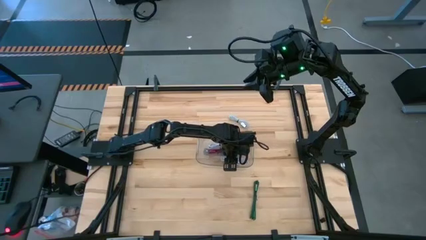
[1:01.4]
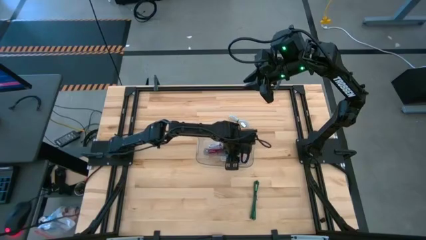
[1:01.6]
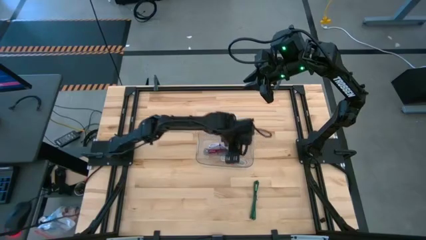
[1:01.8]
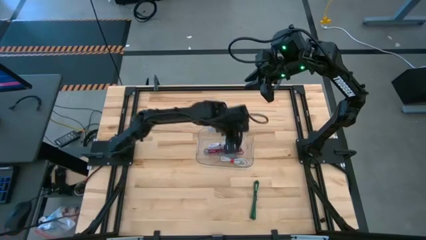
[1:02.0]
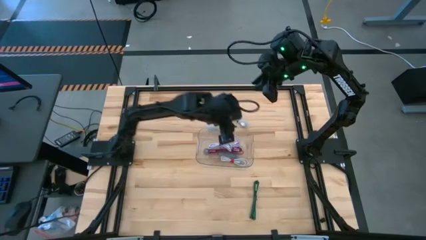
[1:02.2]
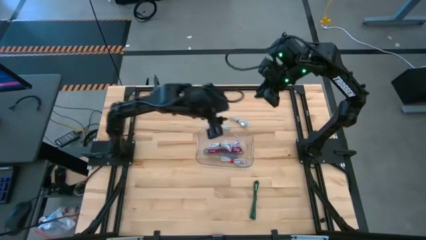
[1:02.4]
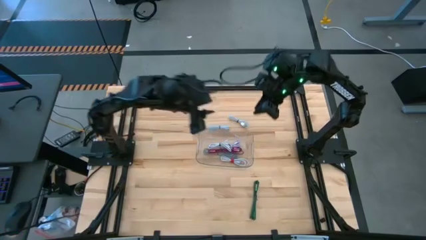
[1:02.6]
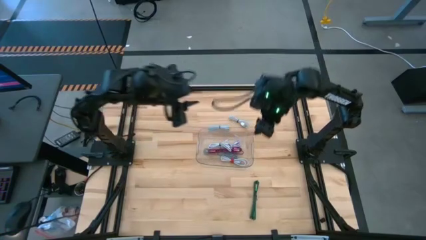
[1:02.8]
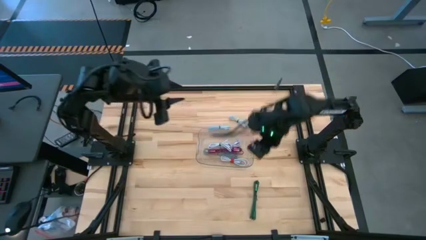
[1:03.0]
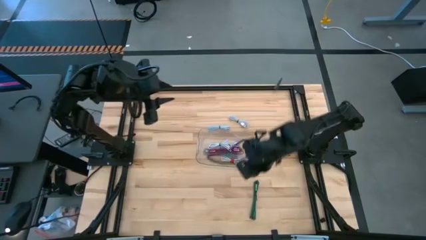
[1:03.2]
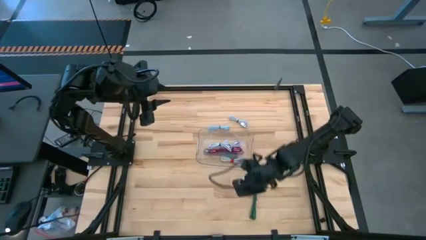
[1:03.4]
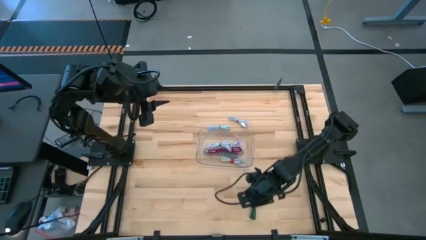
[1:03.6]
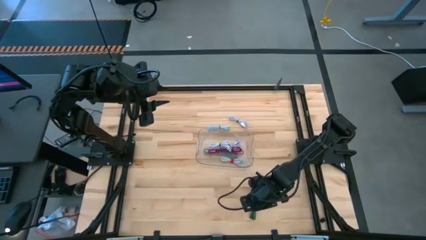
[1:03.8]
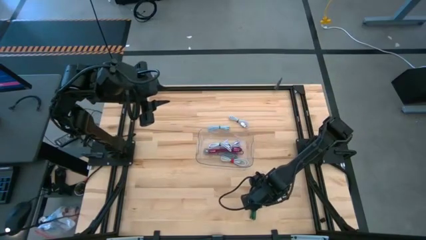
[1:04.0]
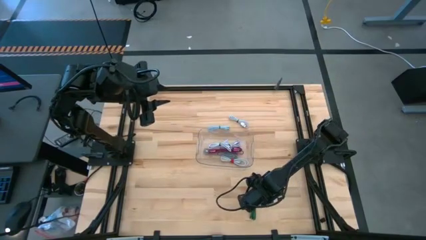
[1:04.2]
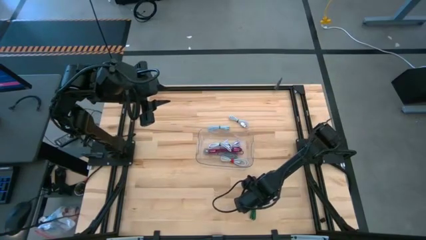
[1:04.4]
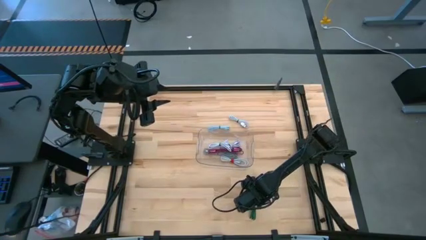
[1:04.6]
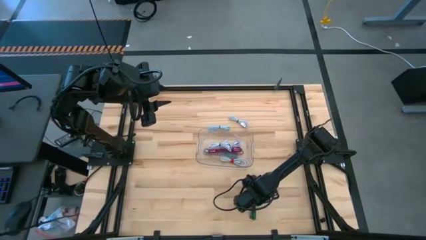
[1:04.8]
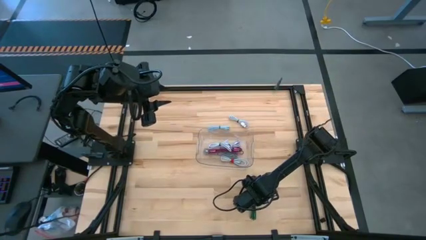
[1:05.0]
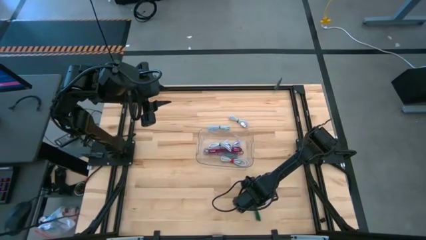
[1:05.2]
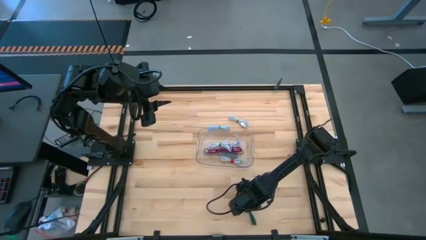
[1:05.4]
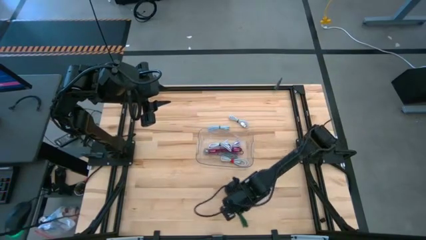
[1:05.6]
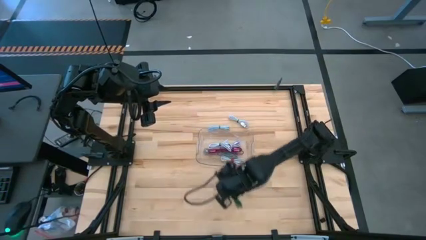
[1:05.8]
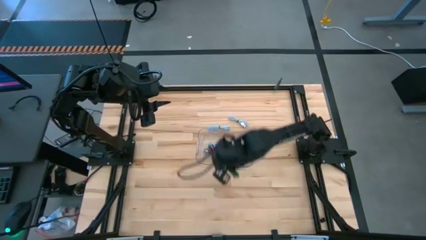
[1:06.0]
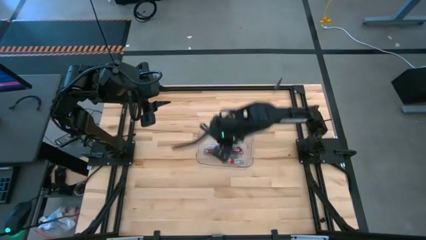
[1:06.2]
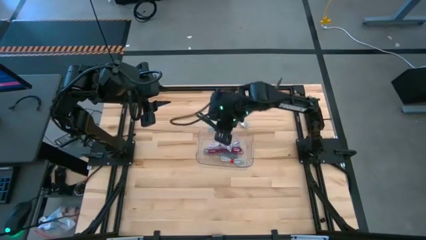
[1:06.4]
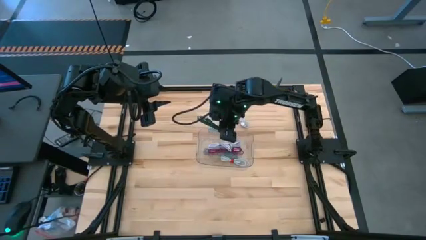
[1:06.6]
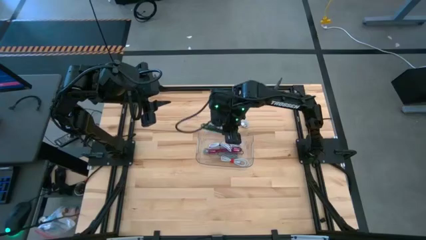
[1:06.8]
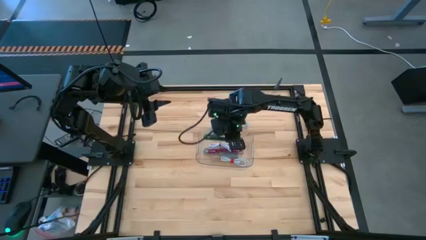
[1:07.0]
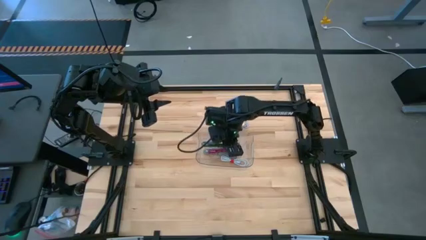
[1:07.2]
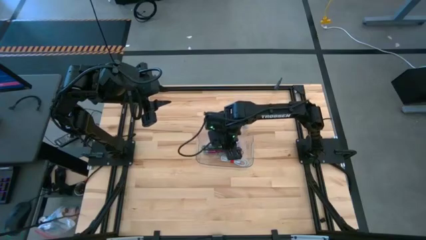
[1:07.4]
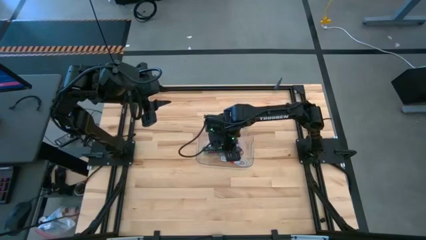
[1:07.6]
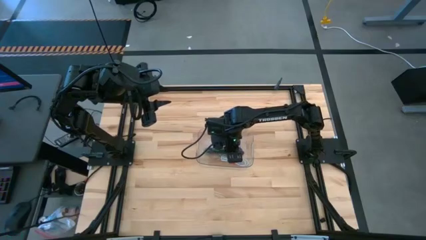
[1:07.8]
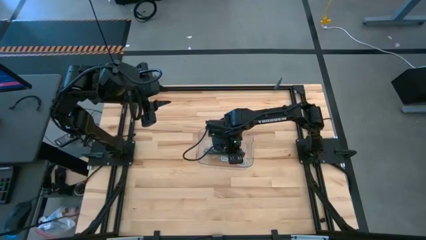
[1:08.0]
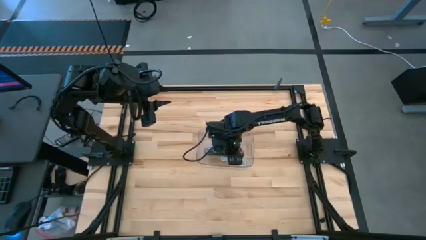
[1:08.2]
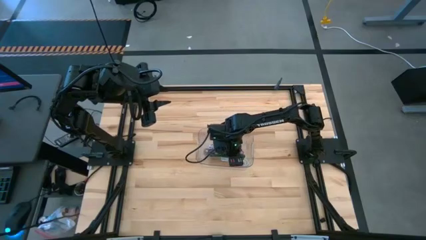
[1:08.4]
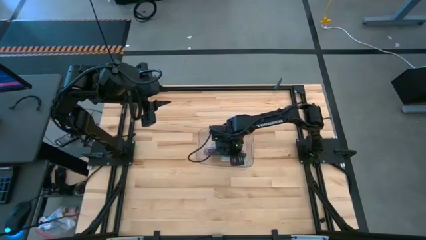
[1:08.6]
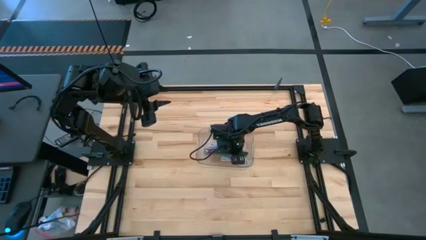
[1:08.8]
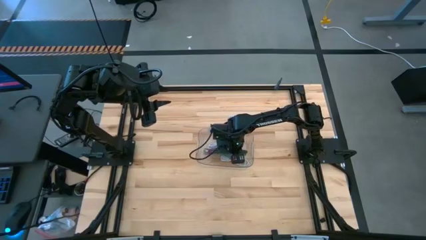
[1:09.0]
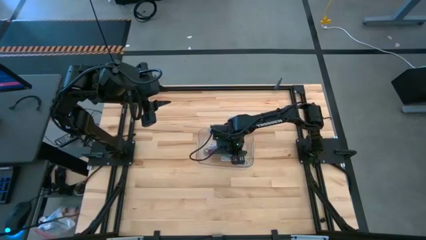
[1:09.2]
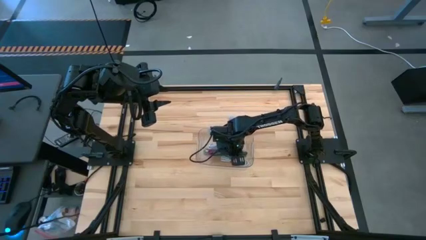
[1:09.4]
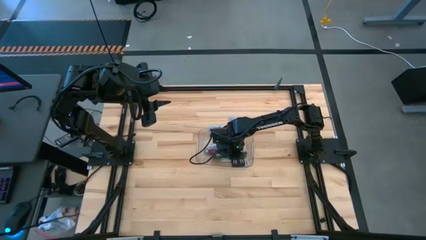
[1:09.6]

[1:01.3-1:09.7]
Task: Pick and place USB-C Cables
Put the green patterned charger cable into the transparent bin
